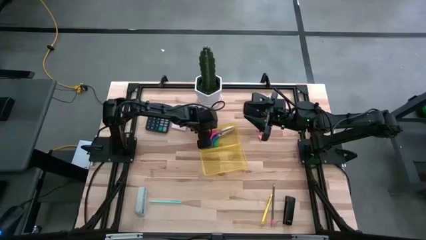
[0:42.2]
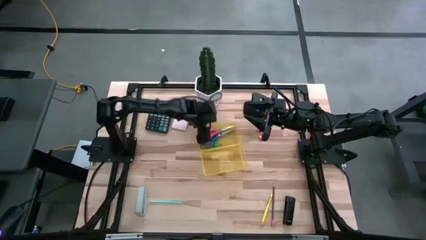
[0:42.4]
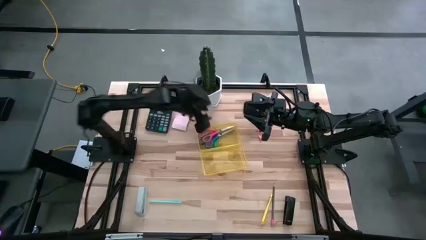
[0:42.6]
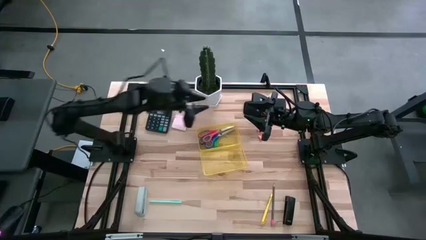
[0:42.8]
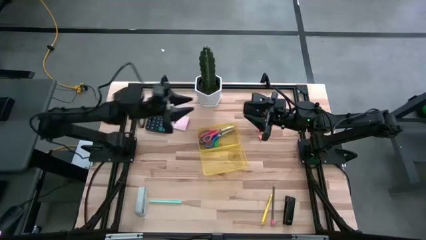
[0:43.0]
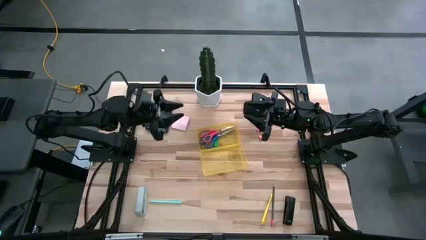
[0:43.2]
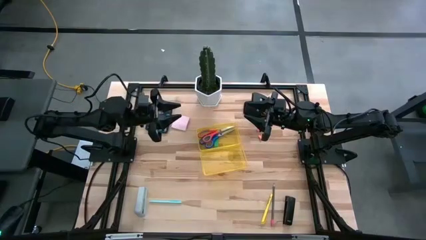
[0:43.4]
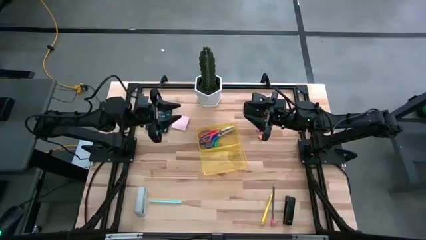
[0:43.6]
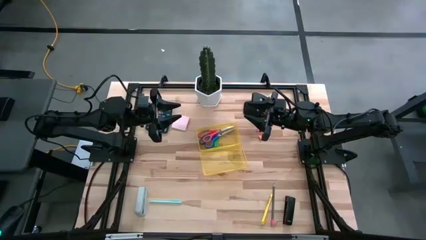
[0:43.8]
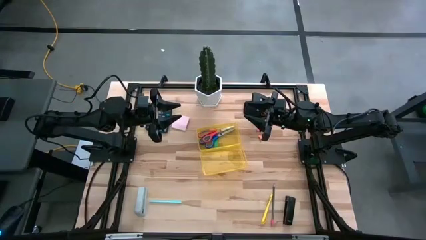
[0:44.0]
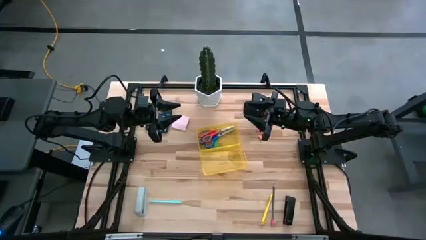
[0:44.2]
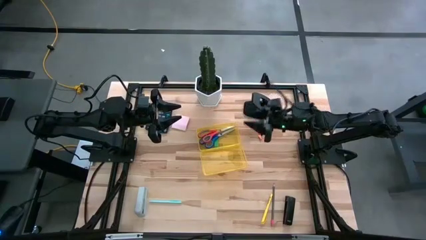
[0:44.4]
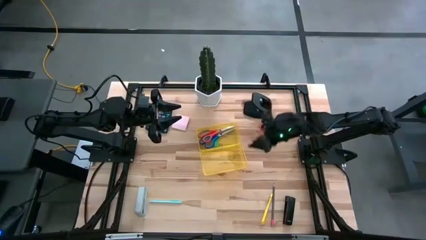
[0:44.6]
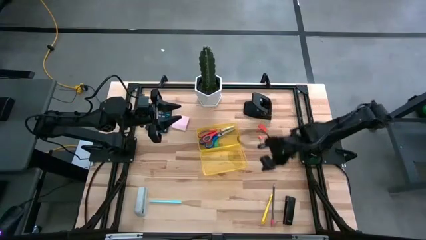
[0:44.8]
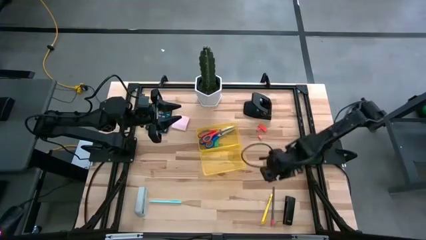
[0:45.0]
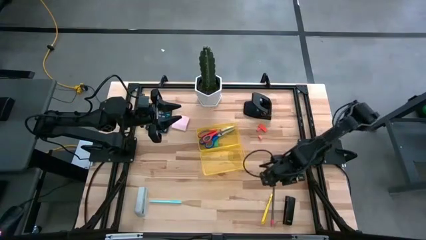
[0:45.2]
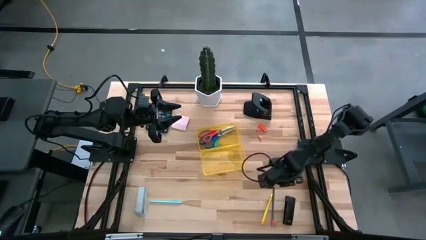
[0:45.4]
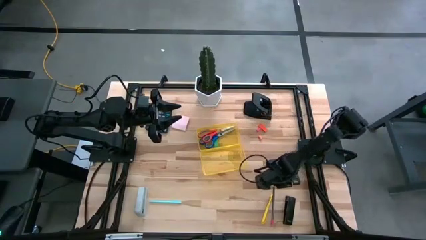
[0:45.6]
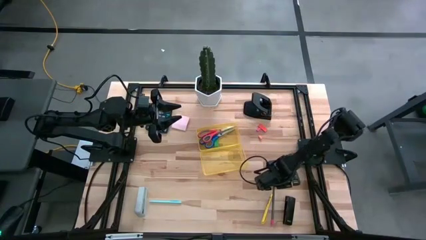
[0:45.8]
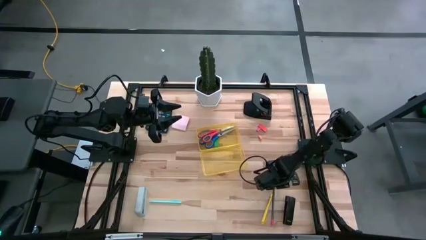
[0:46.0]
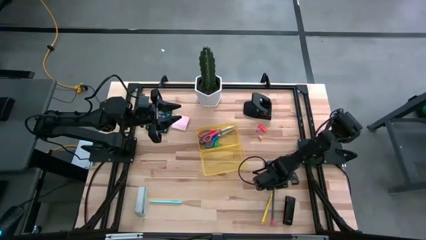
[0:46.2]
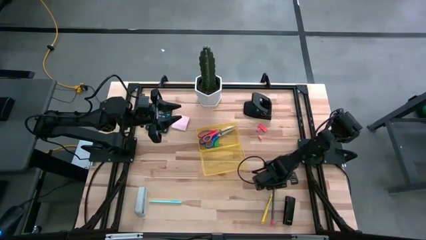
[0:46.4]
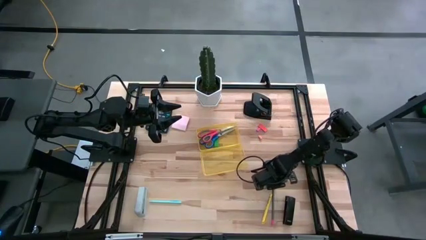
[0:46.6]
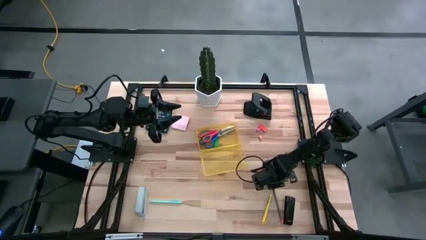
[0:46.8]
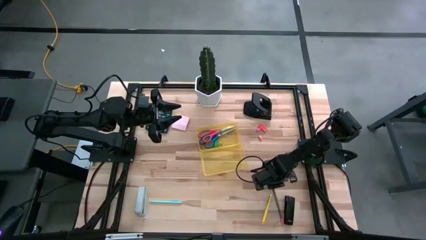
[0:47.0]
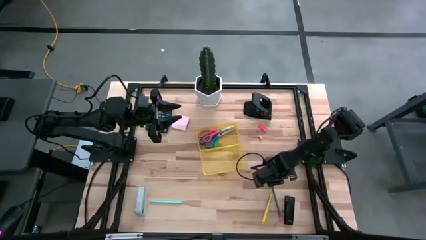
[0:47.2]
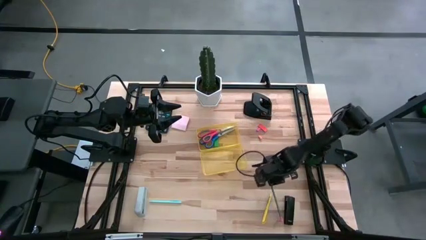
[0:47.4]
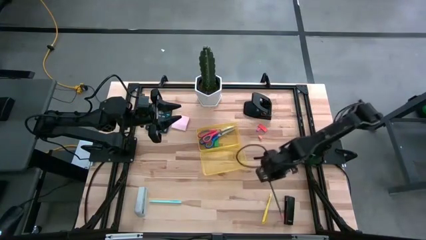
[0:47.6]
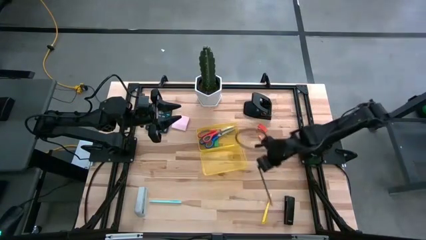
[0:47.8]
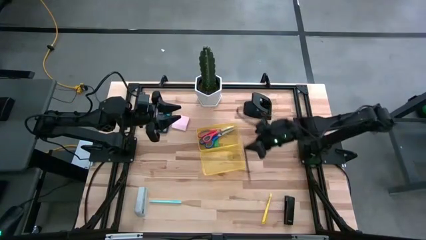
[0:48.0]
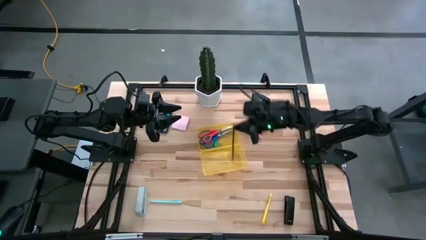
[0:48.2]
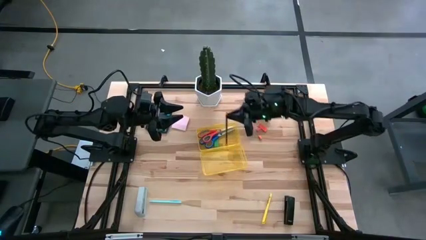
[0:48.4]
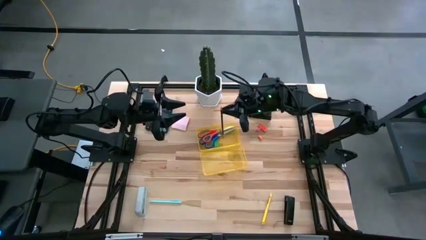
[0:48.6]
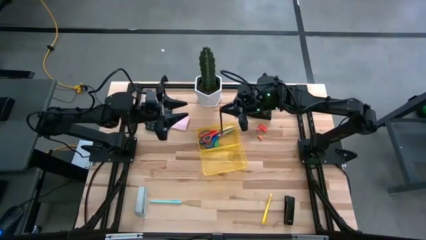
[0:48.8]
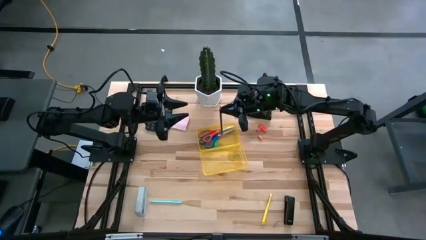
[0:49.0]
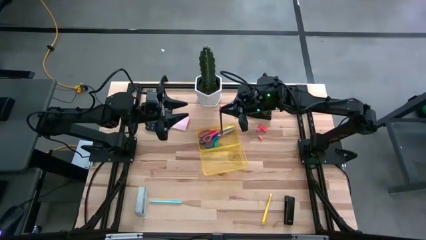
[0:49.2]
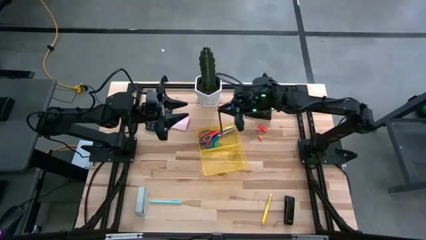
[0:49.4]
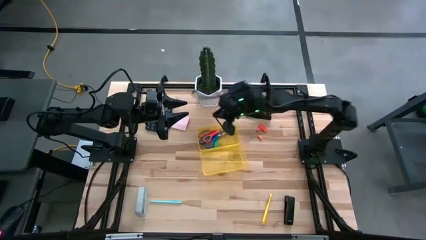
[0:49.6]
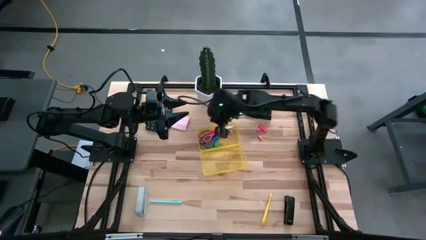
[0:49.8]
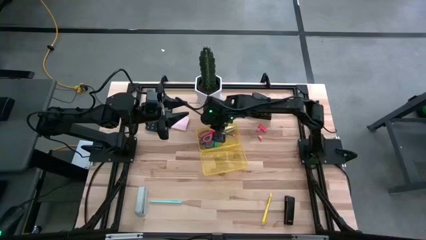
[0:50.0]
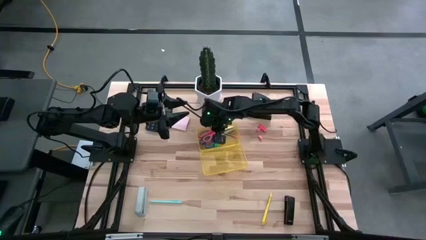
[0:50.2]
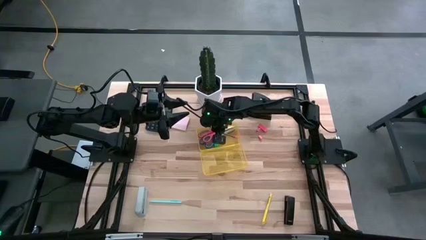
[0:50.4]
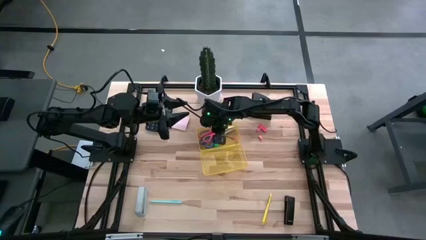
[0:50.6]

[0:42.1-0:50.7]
Task: Pack school essentials
Put the black pencil into the yellow supply box

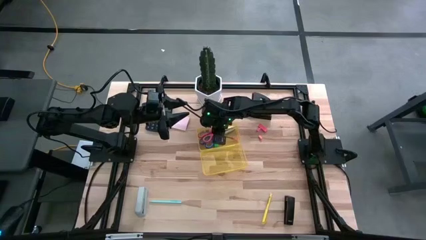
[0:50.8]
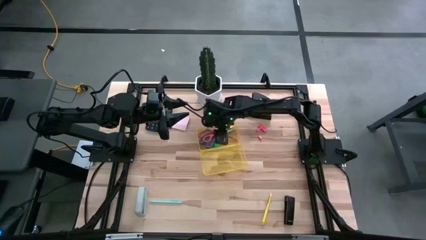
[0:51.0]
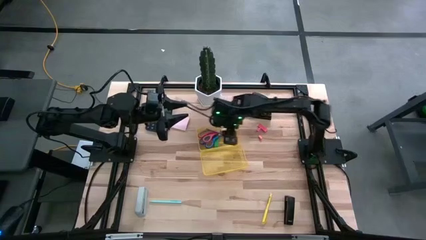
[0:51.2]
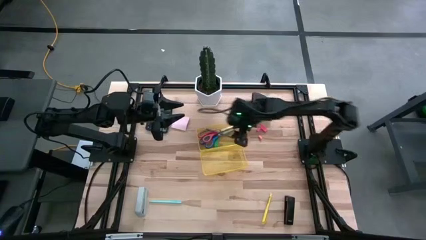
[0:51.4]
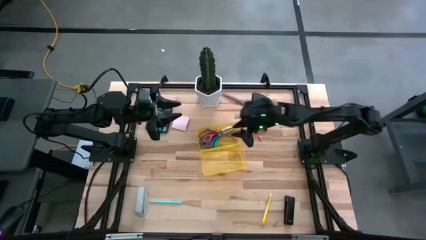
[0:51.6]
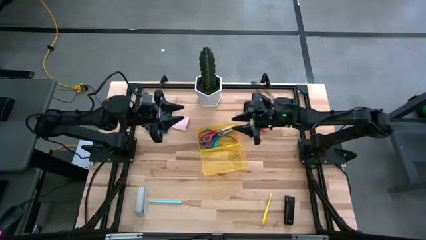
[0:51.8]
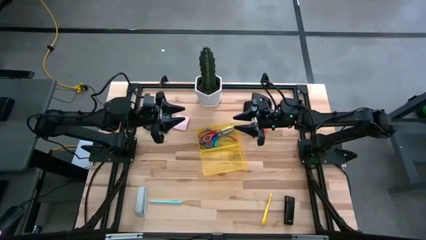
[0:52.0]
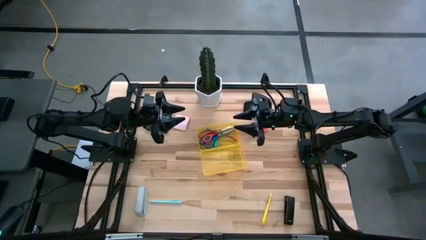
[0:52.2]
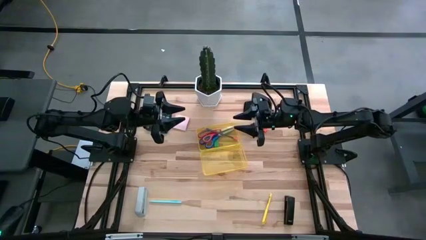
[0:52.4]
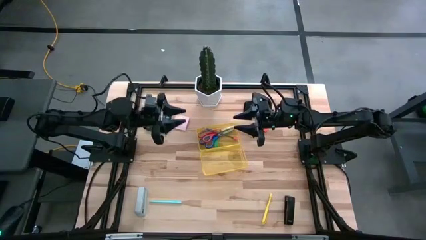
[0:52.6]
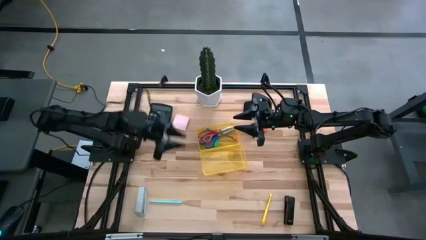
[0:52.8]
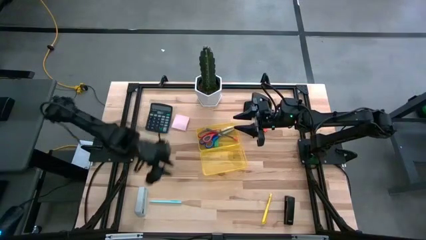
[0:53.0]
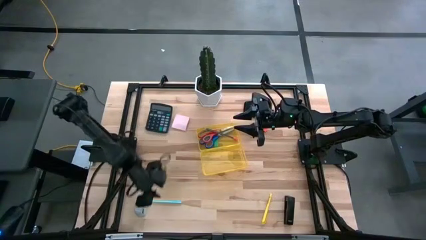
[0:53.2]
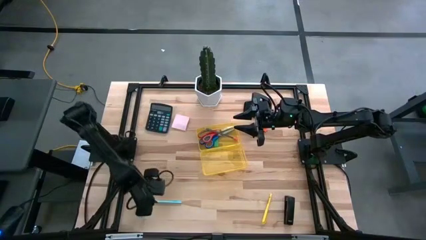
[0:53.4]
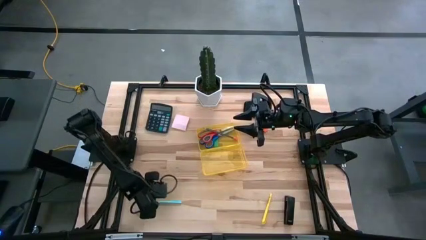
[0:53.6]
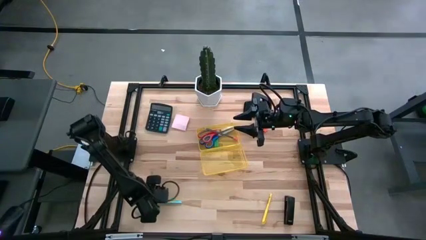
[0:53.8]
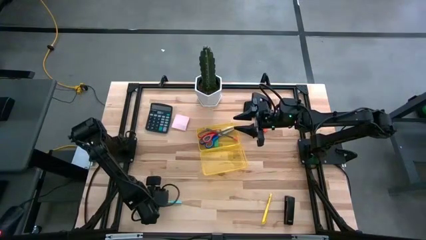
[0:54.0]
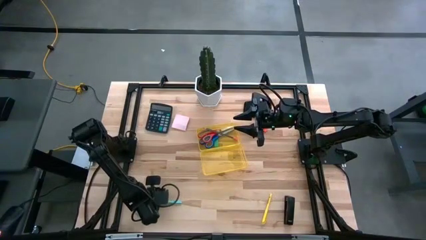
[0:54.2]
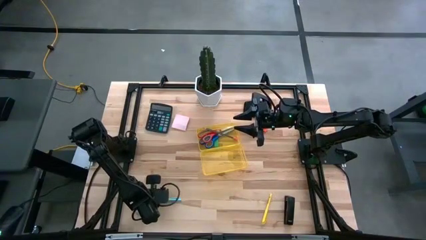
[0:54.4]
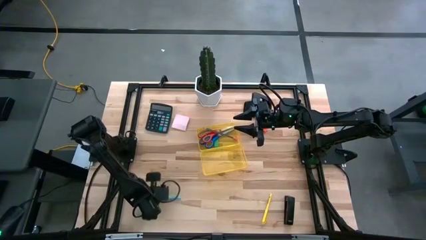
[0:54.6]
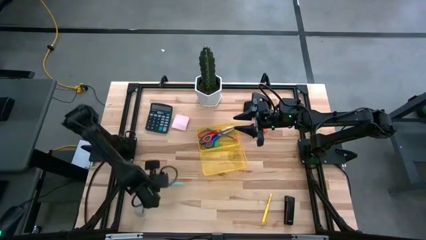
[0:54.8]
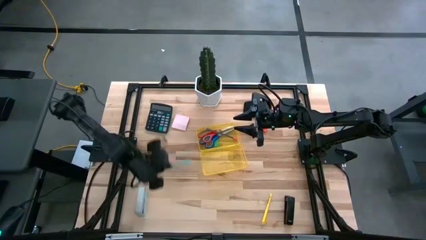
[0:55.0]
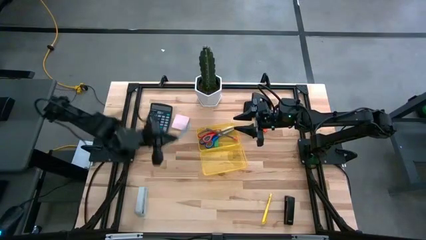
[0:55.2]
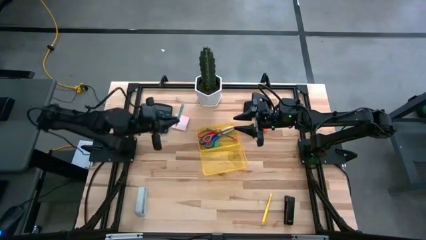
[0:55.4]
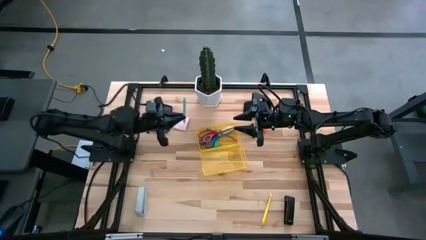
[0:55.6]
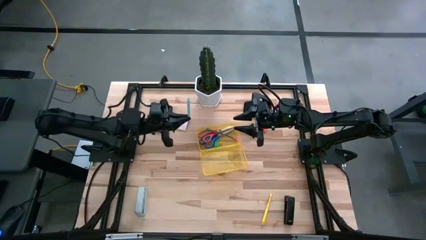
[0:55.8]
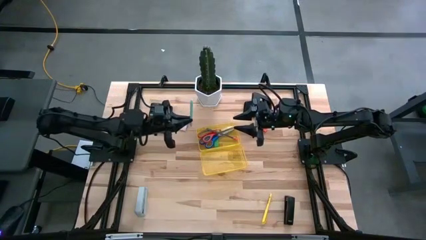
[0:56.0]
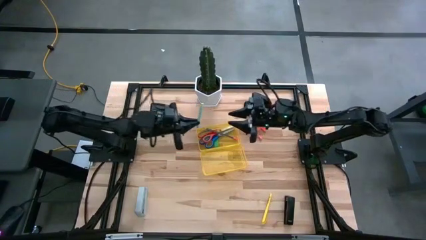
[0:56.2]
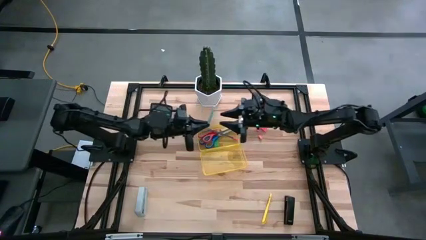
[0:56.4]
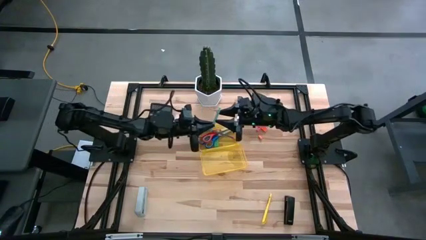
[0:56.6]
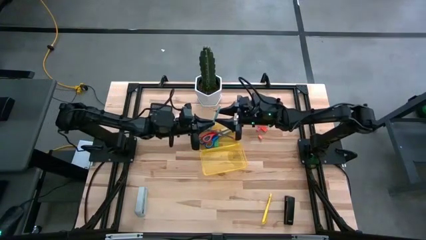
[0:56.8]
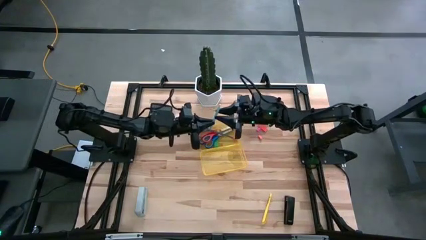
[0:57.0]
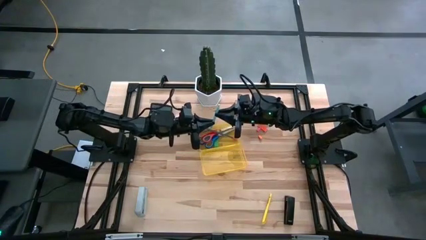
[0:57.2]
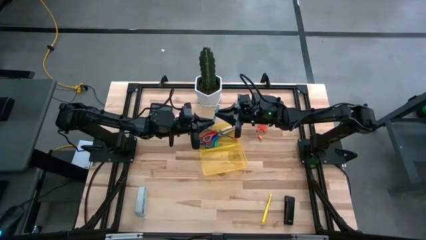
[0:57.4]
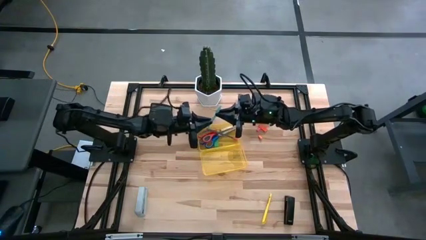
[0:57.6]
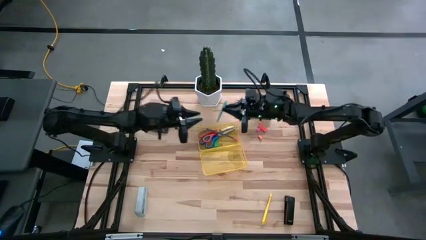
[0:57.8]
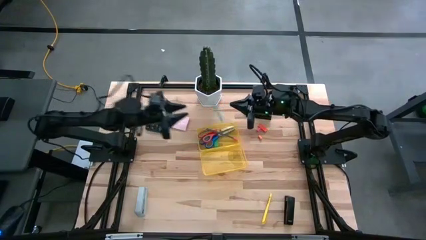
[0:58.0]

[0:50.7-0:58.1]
Put the blue pen into the yellow supply box

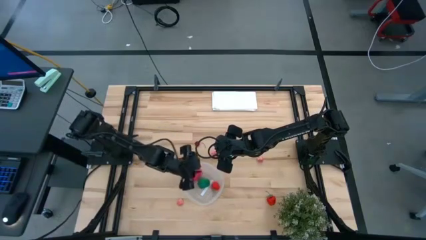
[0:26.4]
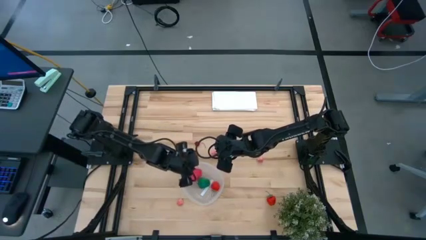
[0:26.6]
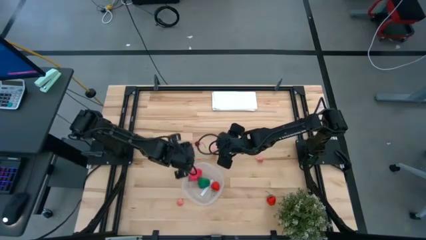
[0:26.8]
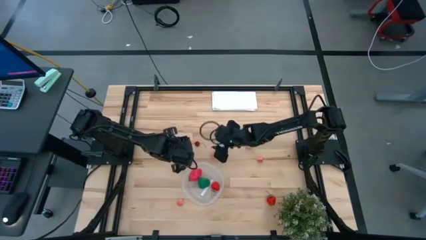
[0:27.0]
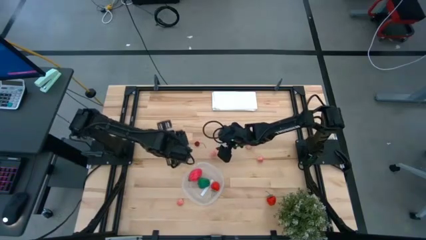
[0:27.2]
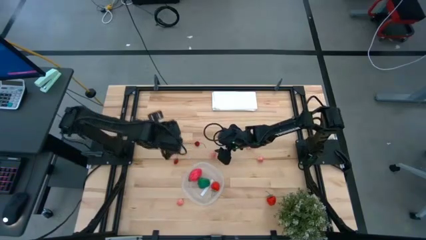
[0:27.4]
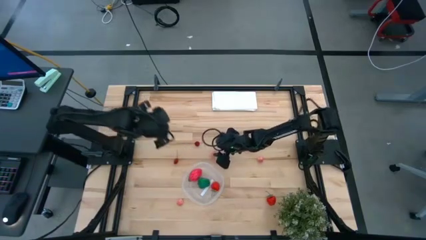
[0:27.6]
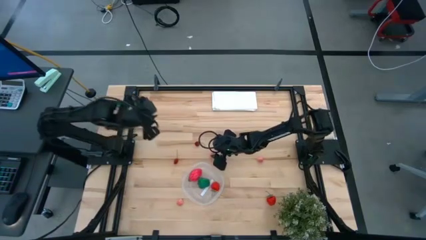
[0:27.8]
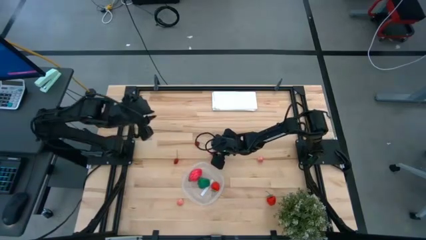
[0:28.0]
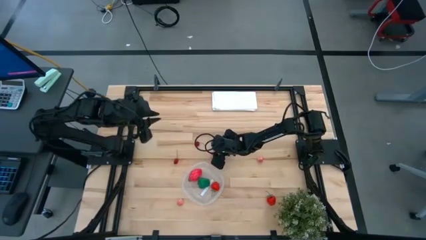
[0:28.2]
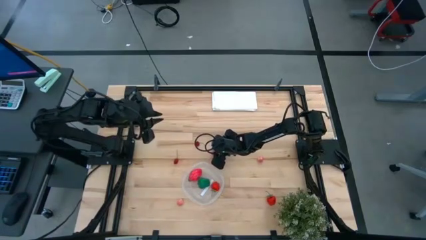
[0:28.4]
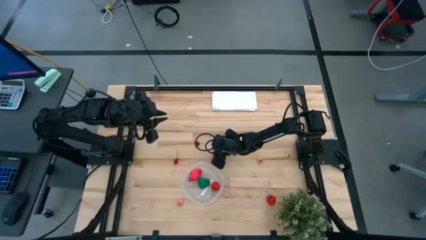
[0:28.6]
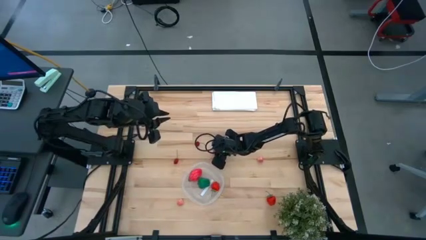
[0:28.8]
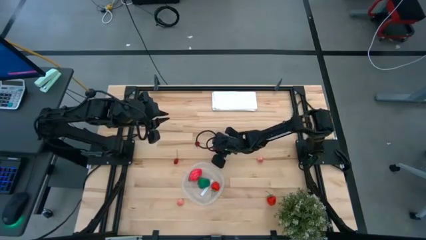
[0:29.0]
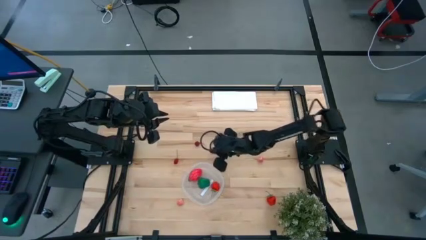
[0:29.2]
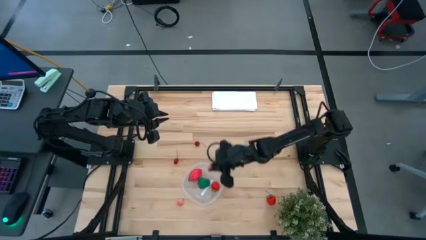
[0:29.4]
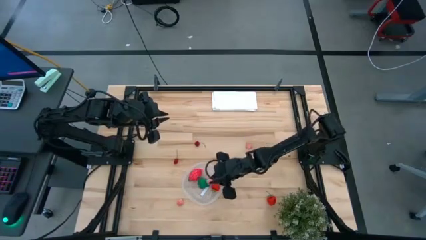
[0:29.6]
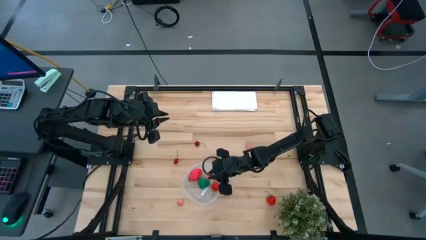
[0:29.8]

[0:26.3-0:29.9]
Task: Pick and placing Produce into tupperware
Put the pink peach into the transparent bin
